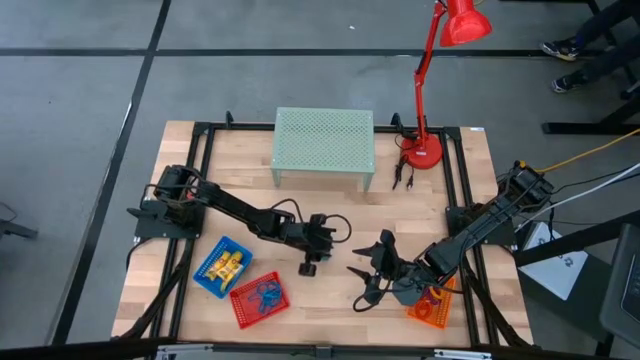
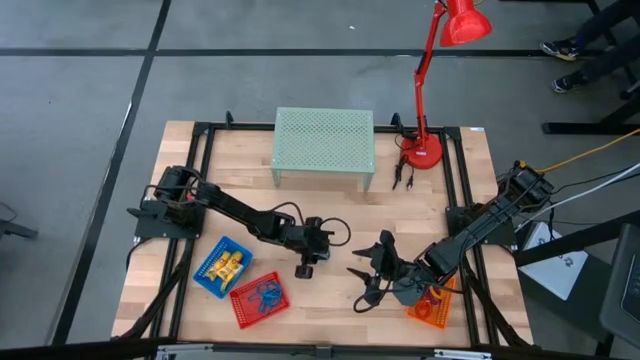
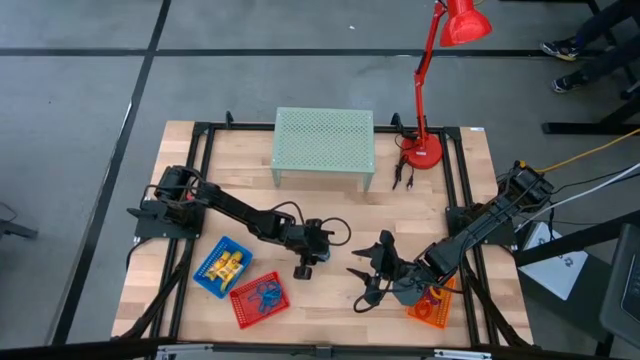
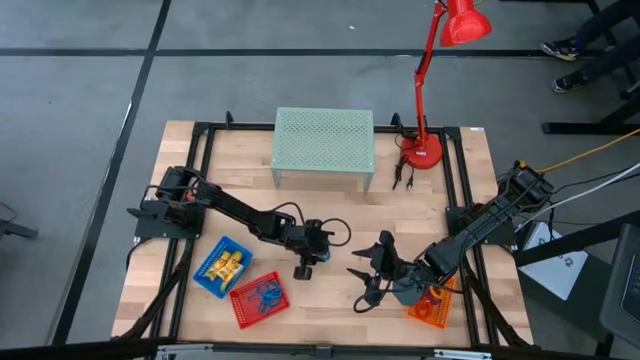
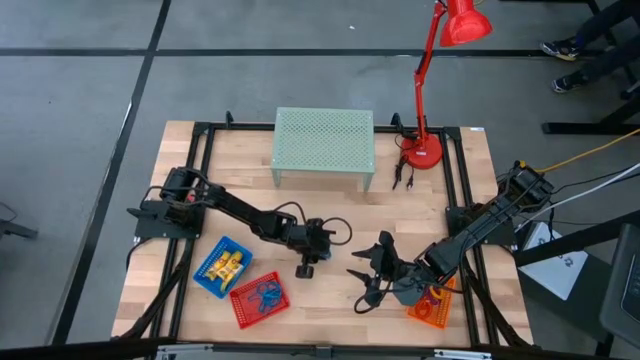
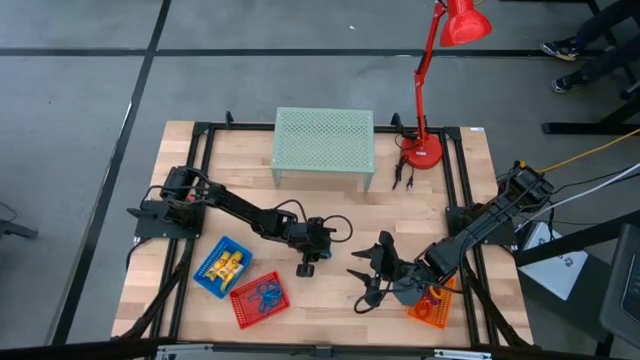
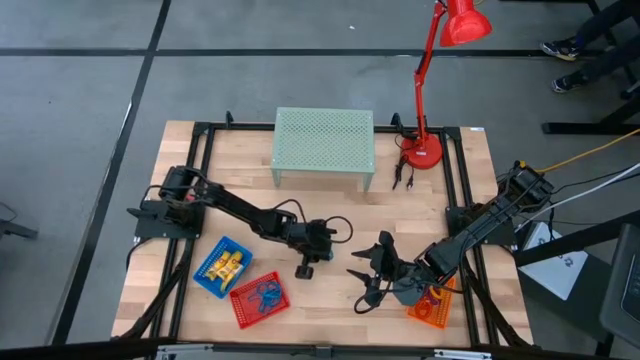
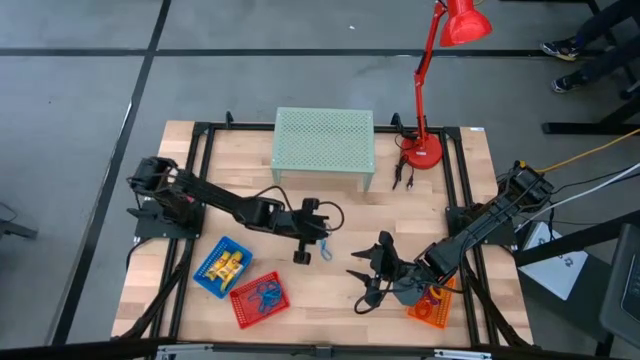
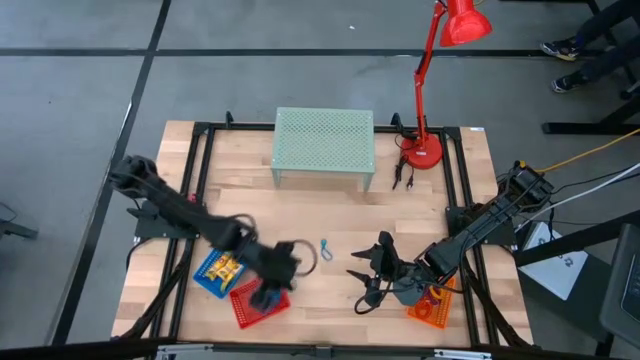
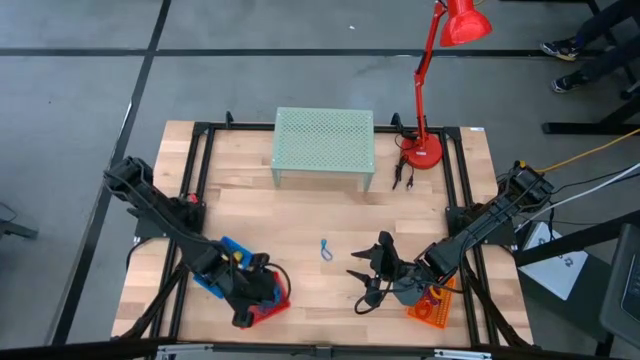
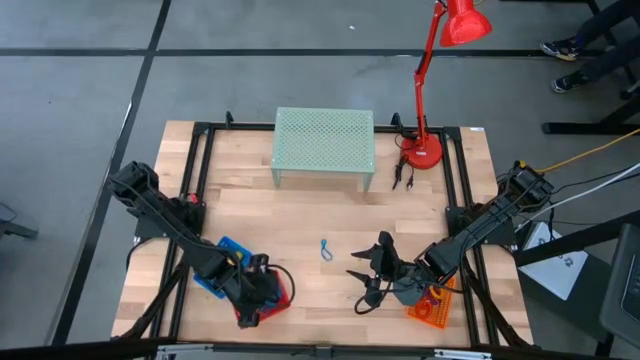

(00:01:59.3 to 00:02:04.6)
Task: Pick & Place Office Desk Supplies
Put the blue rubber band into the red bin

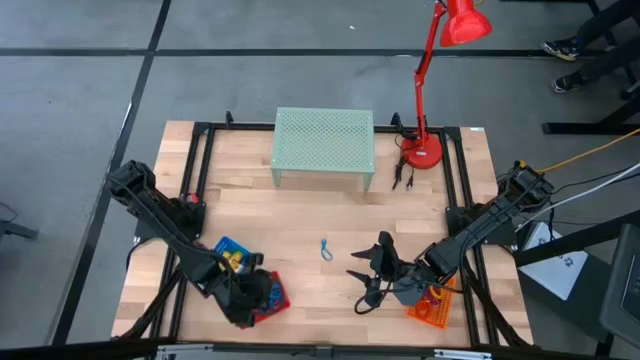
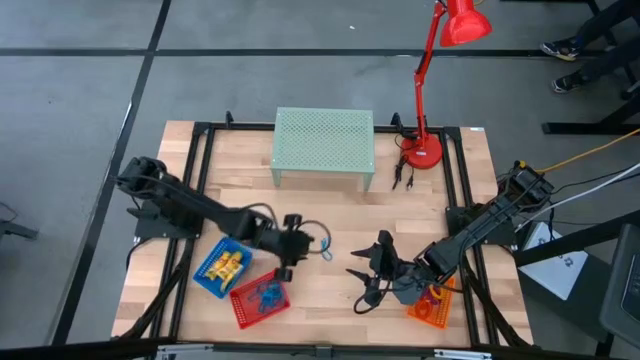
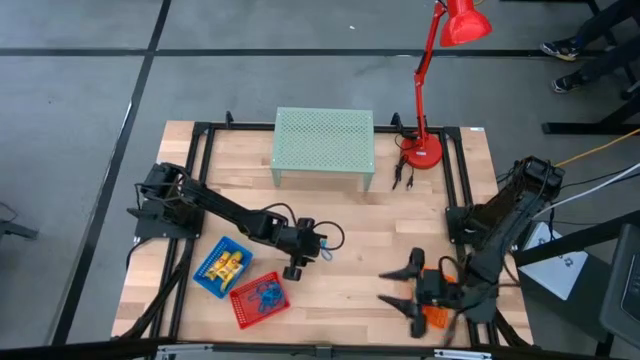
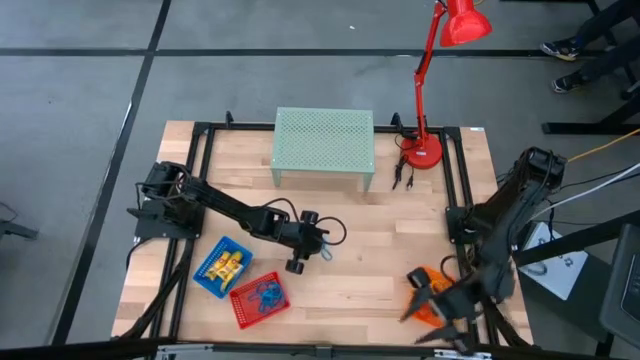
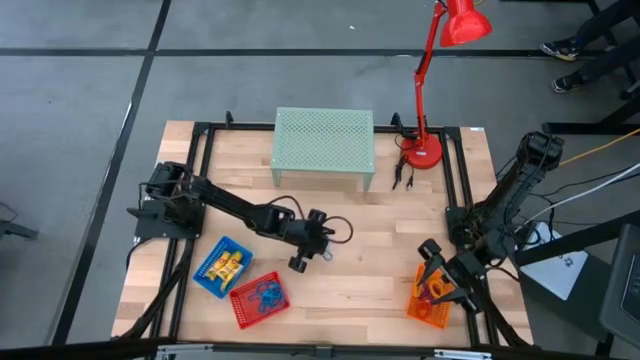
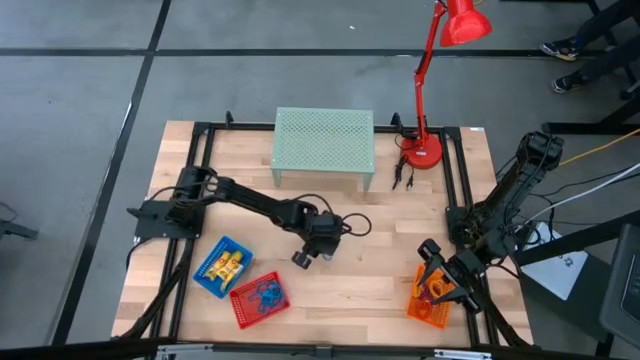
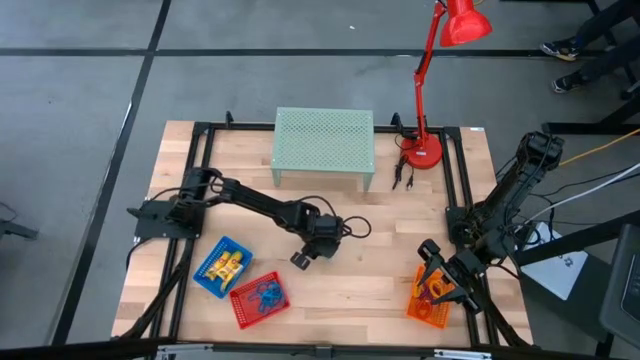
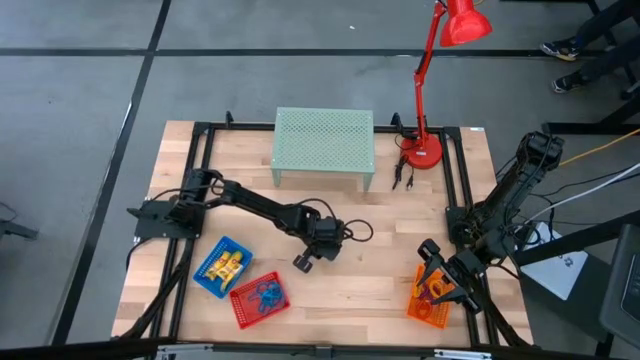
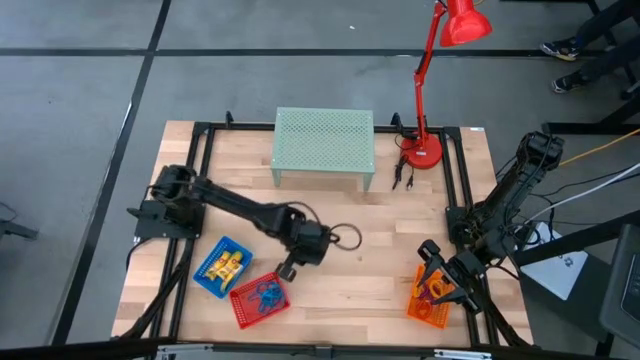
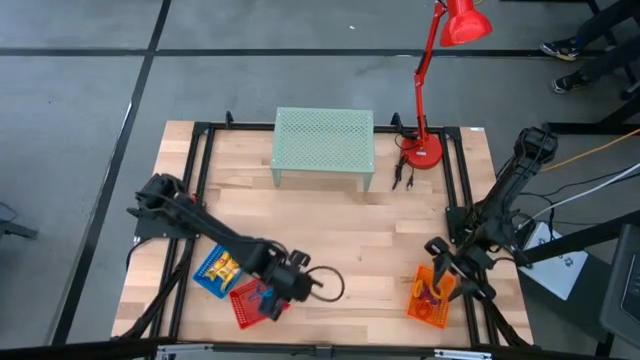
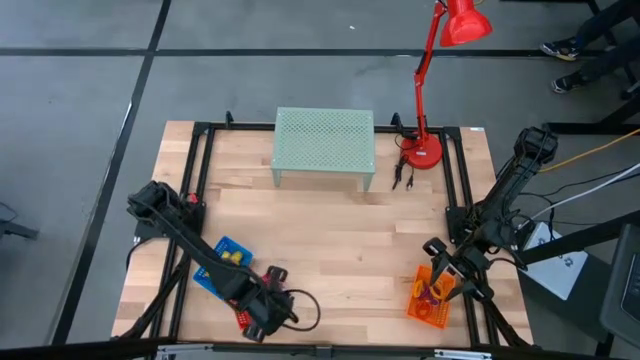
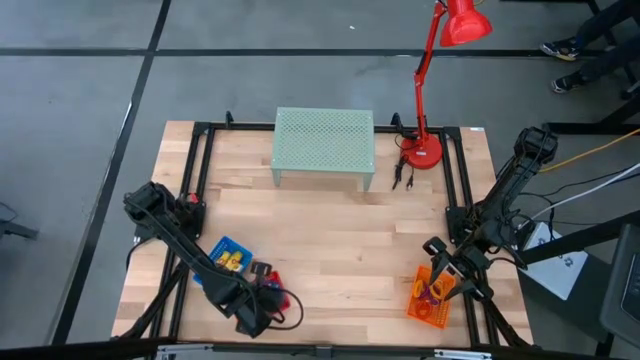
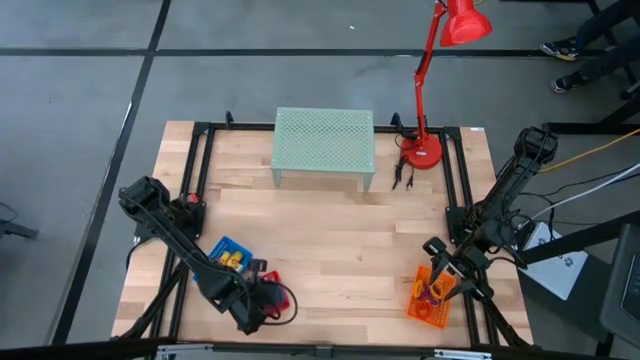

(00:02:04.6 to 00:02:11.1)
Put the blue rubber band into the red bin

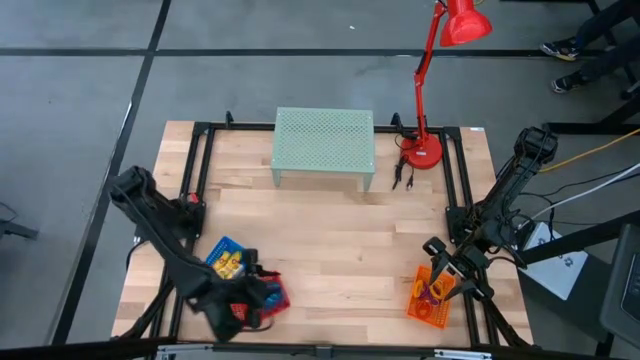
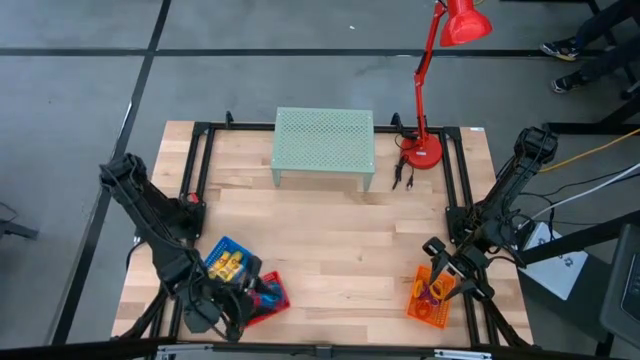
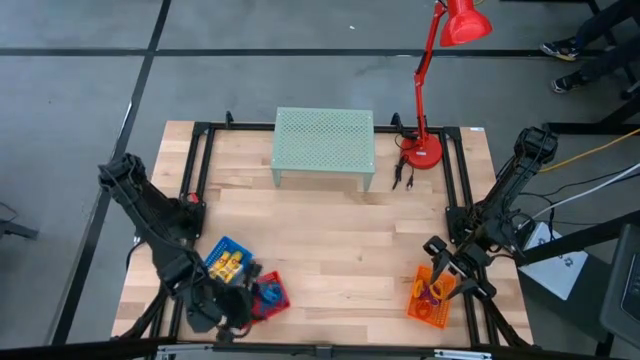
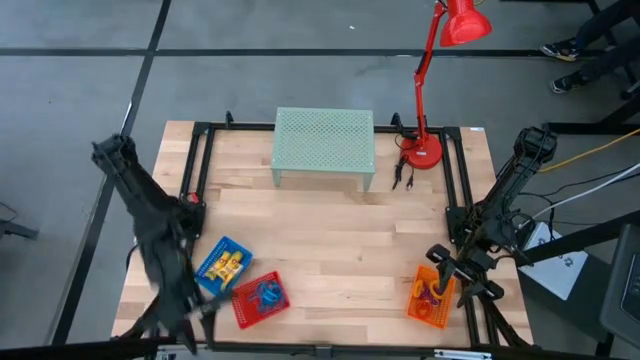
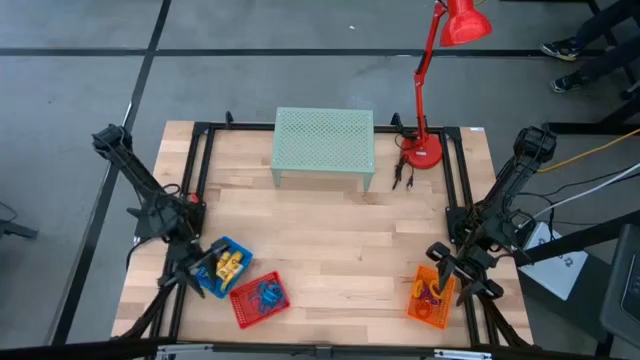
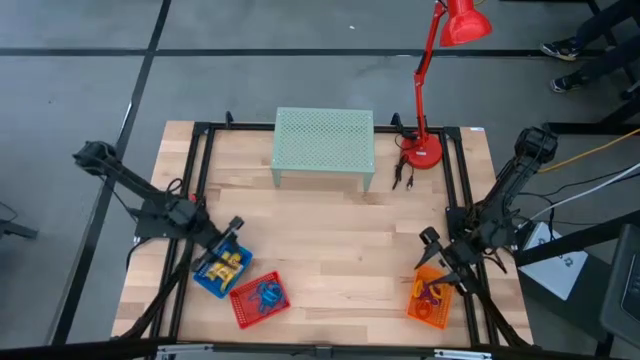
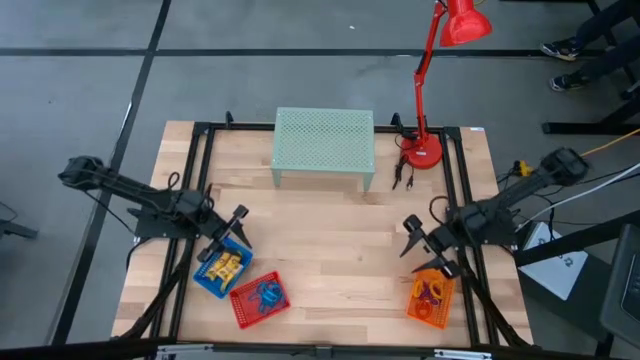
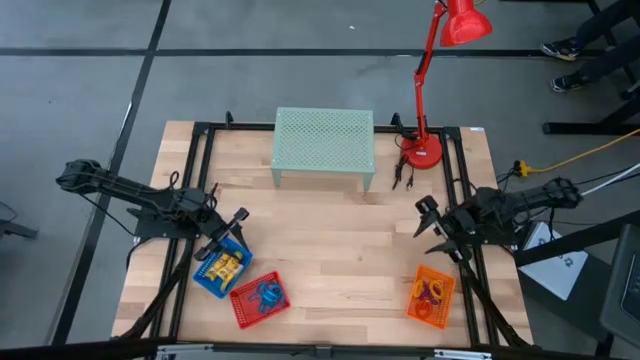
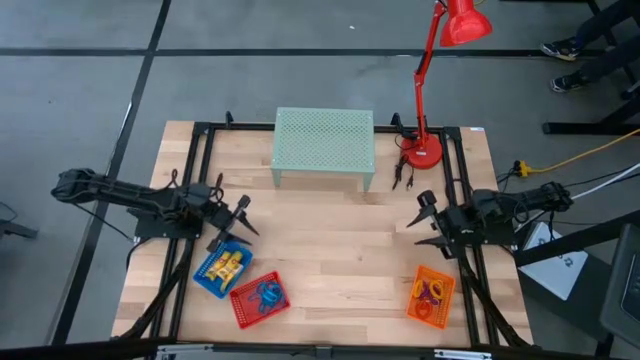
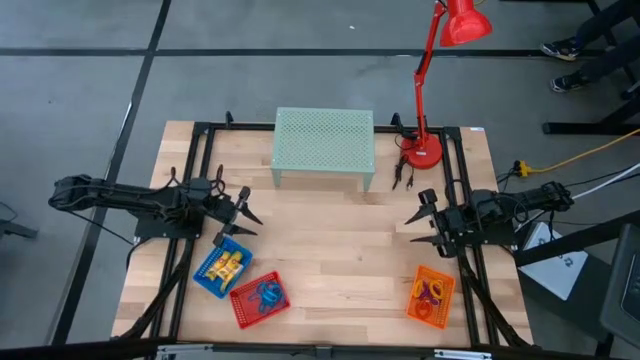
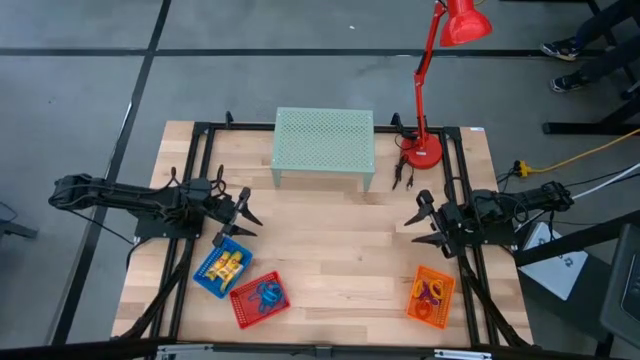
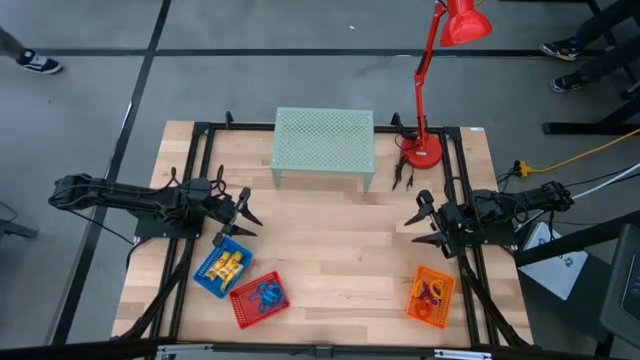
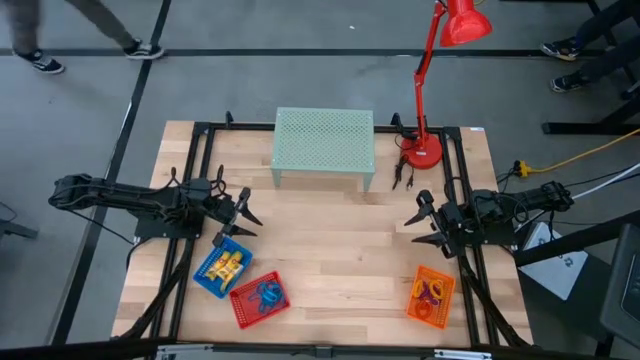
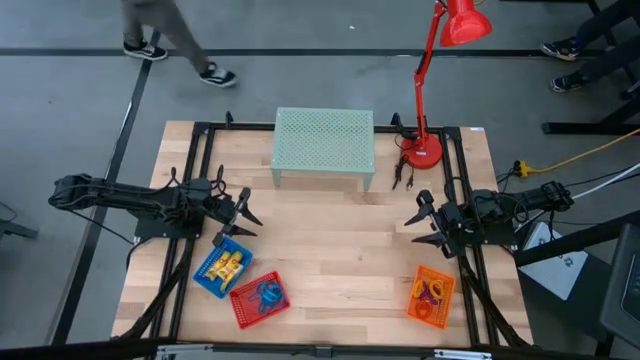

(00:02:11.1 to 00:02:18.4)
Return to Home Position

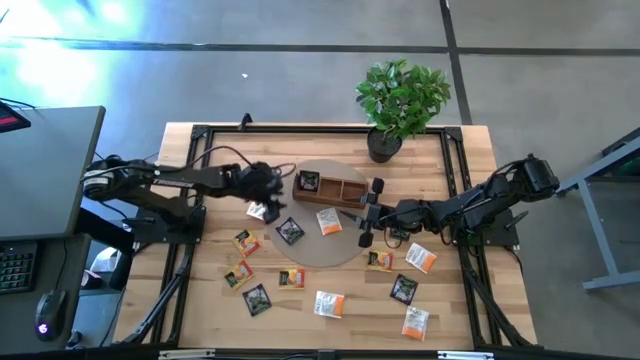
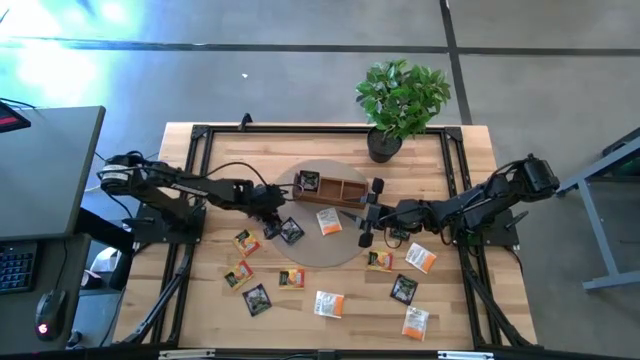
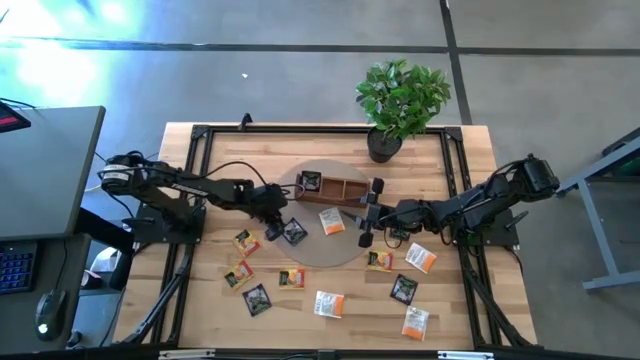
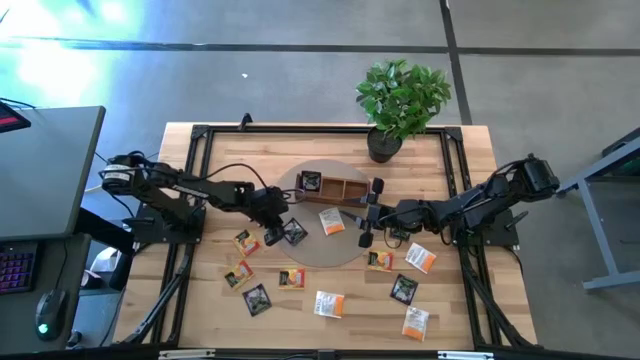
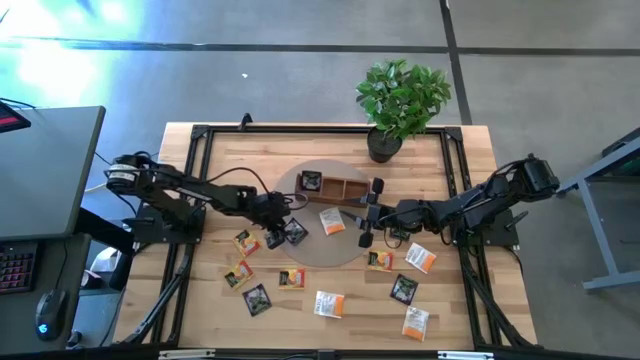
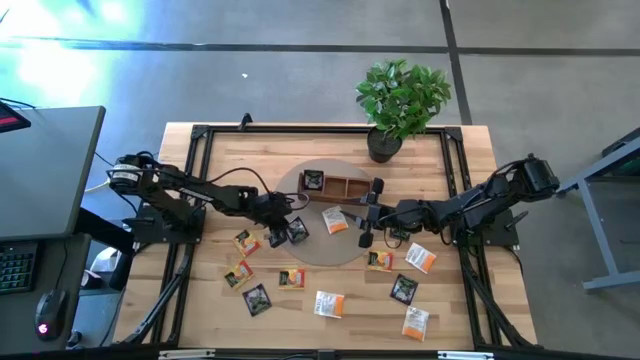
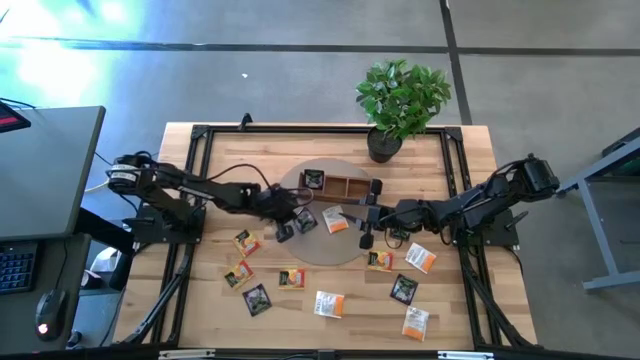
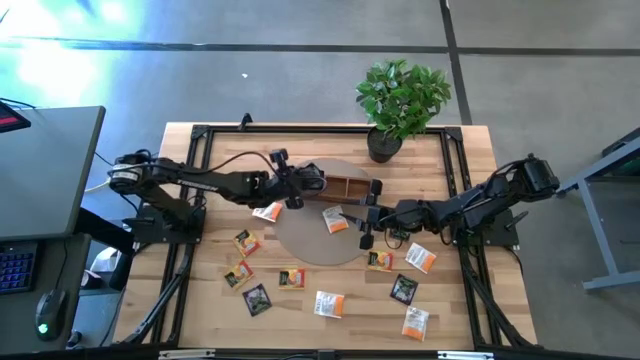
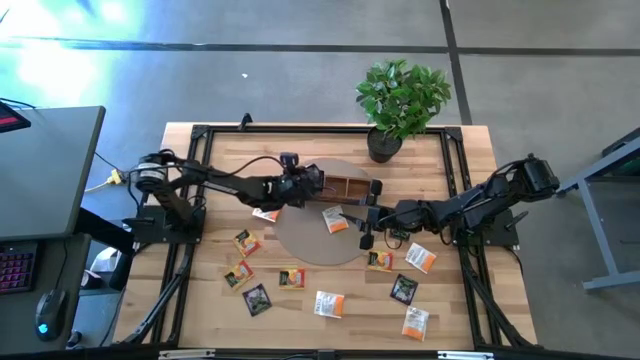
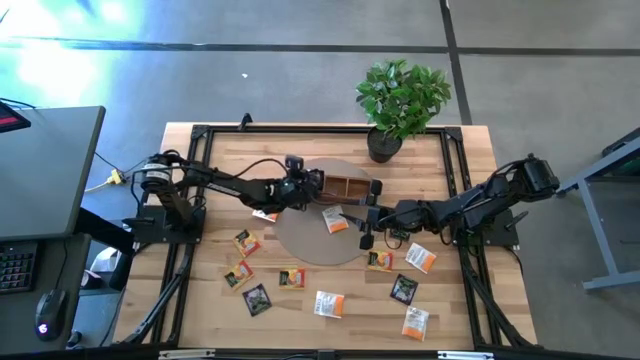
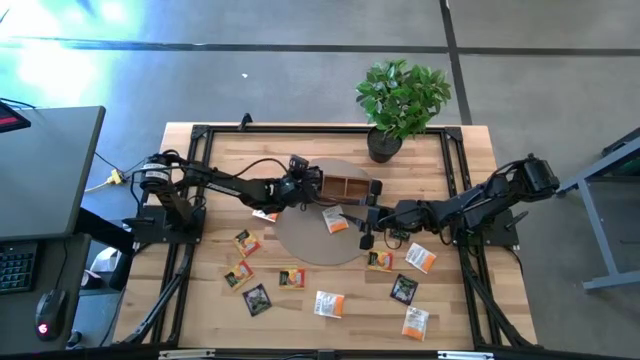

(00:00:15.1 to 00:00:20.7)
Task: Pick & Place Tea
Put the black tea bag into the left side area of the wooden organizer
